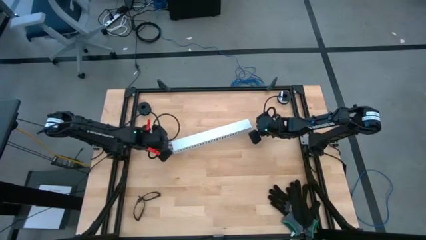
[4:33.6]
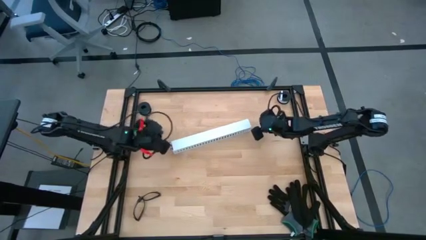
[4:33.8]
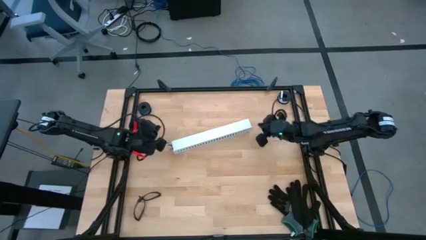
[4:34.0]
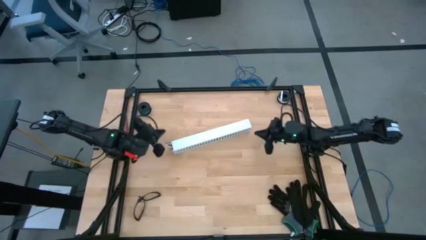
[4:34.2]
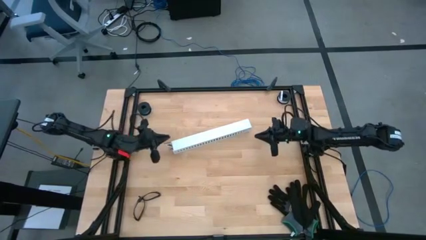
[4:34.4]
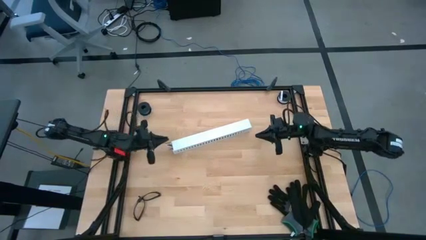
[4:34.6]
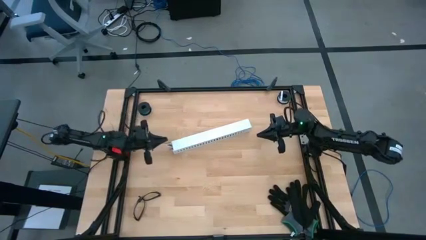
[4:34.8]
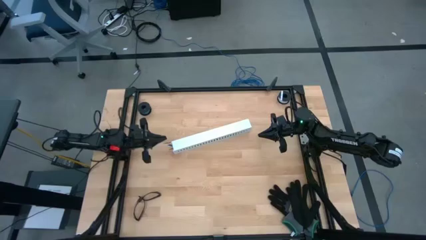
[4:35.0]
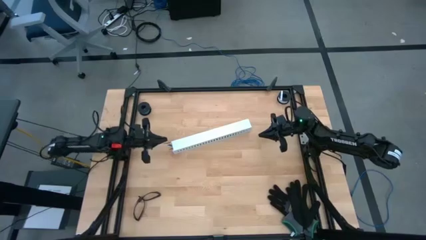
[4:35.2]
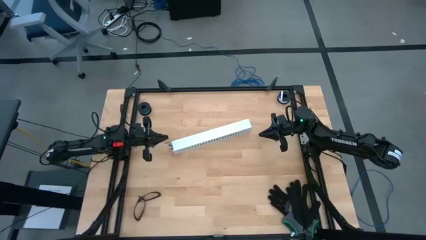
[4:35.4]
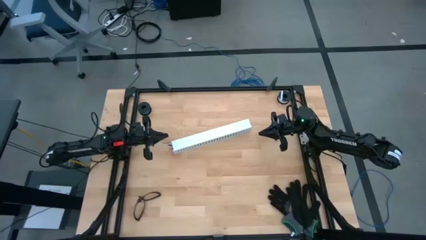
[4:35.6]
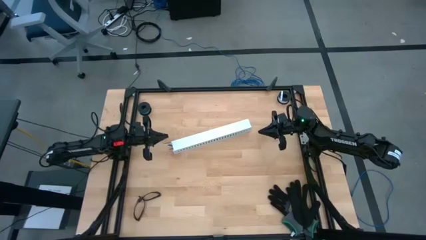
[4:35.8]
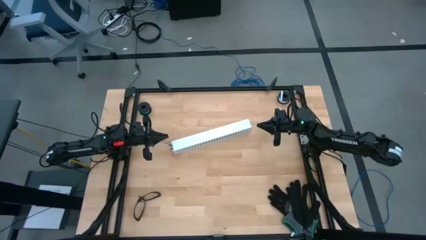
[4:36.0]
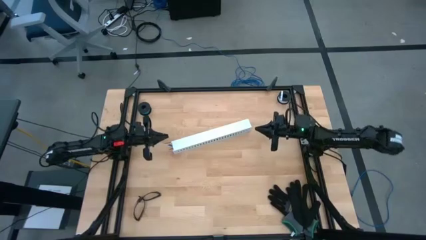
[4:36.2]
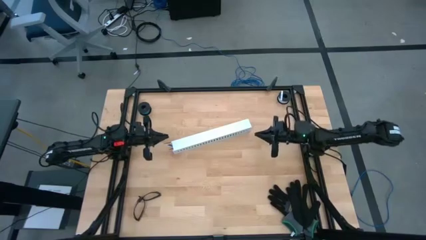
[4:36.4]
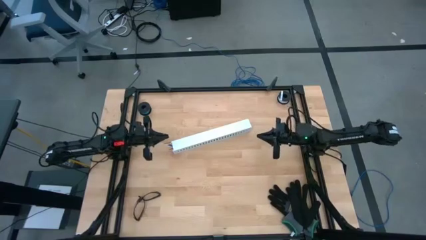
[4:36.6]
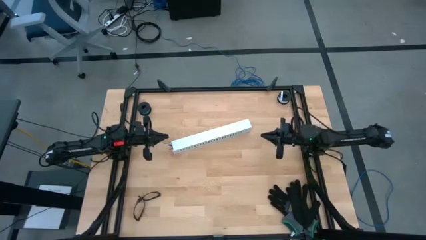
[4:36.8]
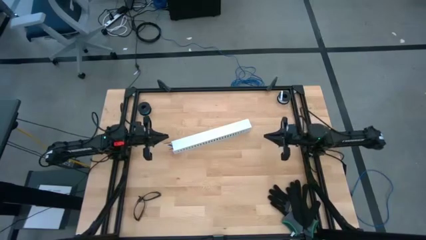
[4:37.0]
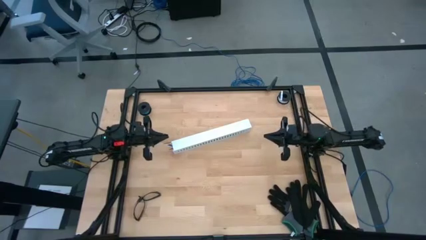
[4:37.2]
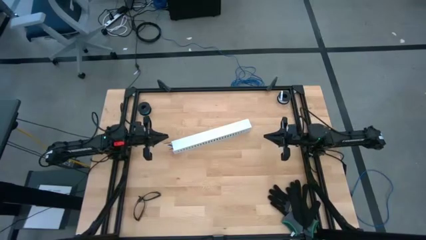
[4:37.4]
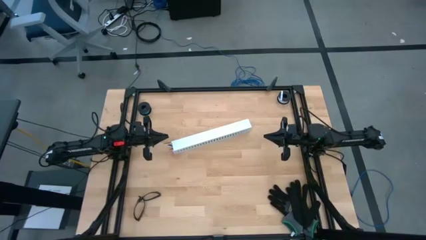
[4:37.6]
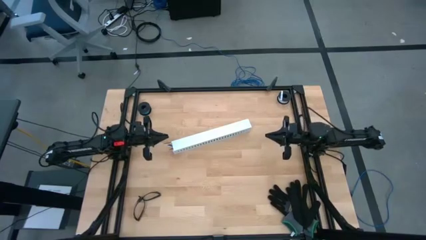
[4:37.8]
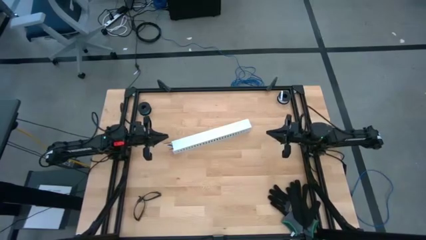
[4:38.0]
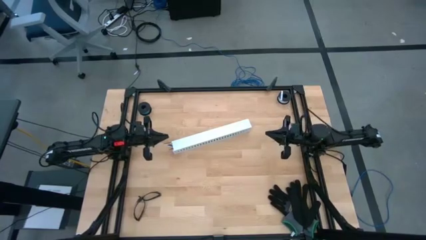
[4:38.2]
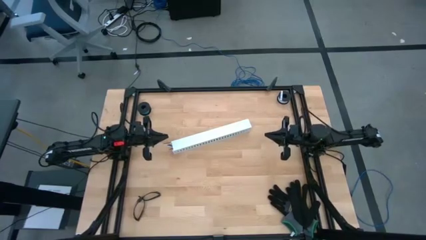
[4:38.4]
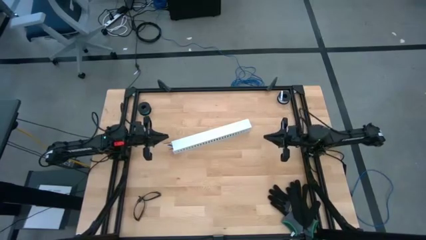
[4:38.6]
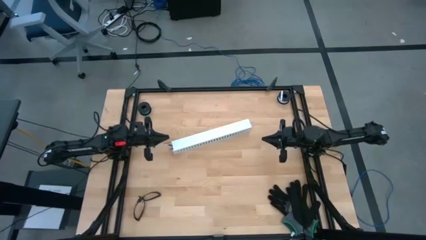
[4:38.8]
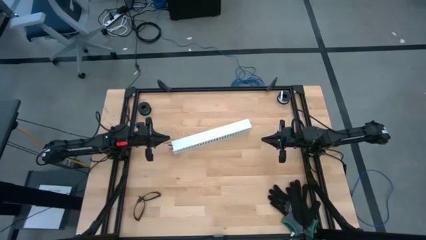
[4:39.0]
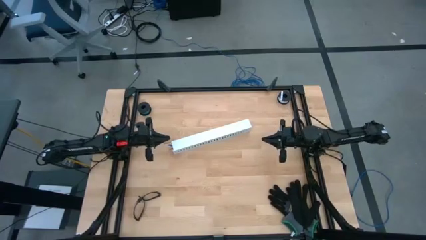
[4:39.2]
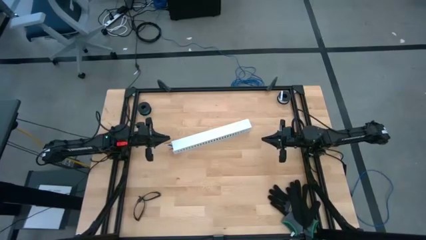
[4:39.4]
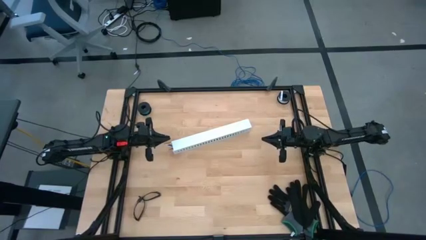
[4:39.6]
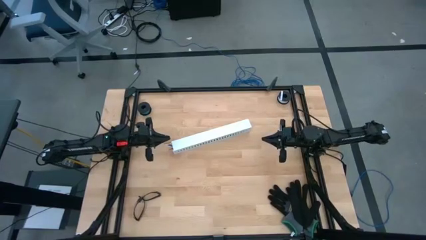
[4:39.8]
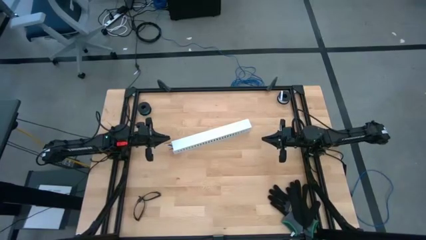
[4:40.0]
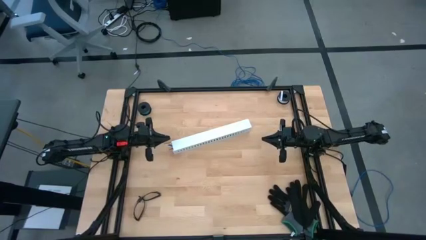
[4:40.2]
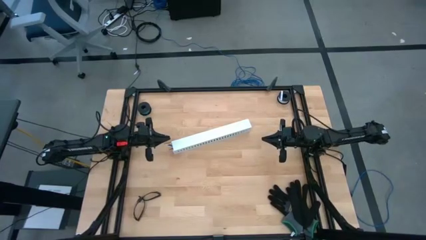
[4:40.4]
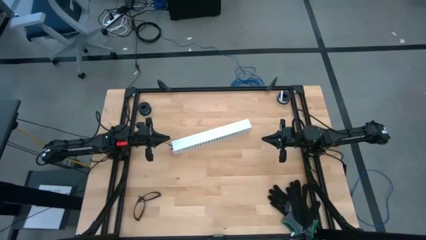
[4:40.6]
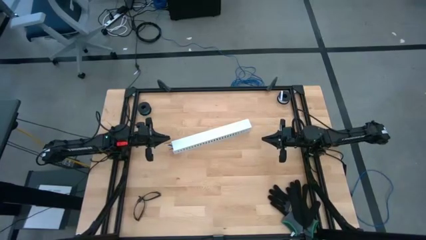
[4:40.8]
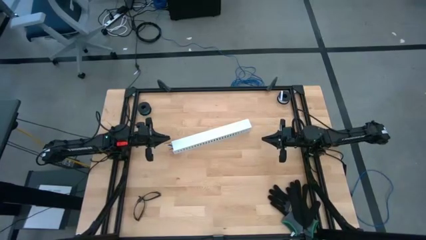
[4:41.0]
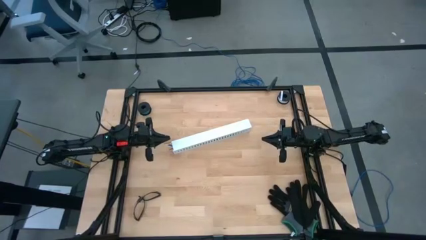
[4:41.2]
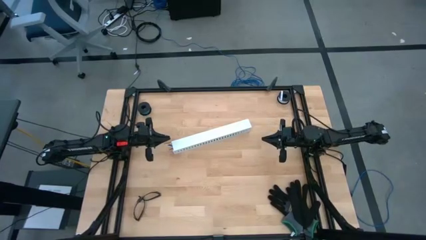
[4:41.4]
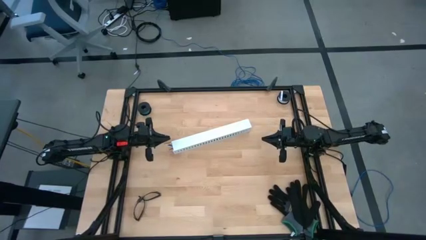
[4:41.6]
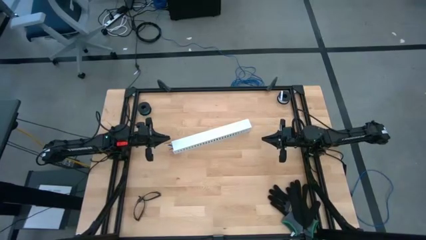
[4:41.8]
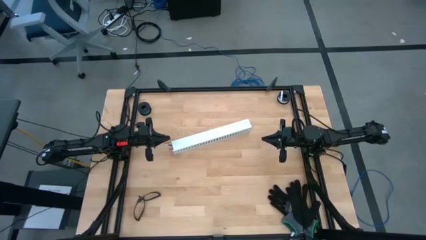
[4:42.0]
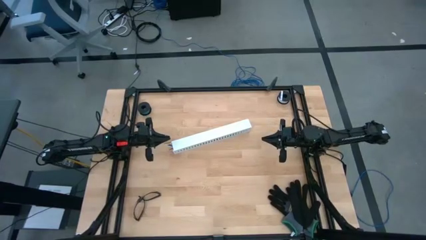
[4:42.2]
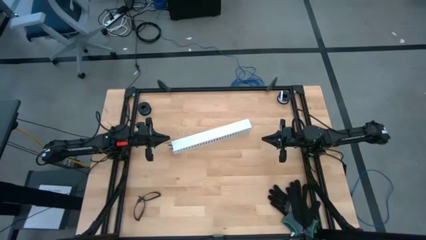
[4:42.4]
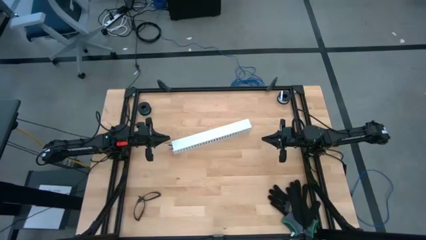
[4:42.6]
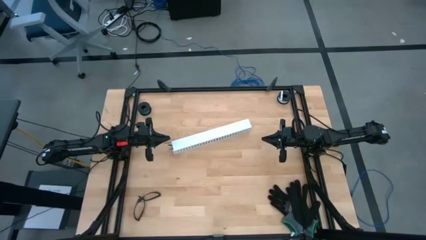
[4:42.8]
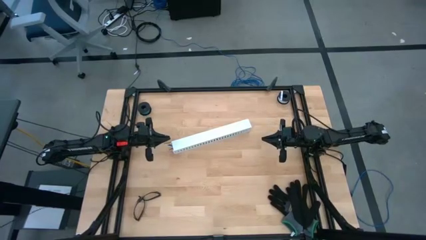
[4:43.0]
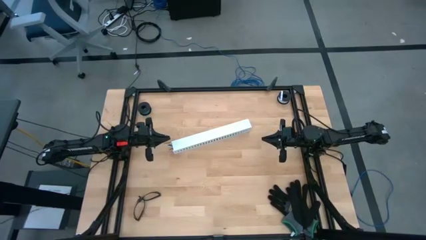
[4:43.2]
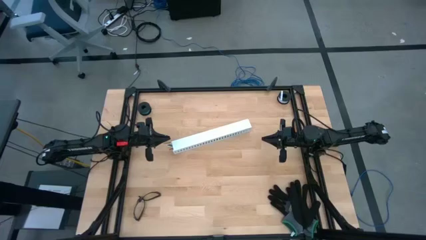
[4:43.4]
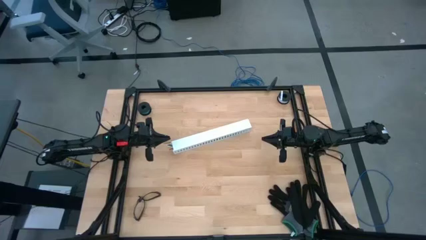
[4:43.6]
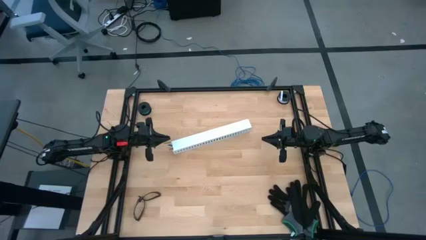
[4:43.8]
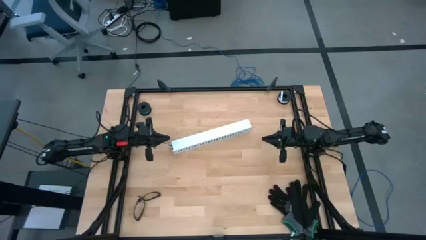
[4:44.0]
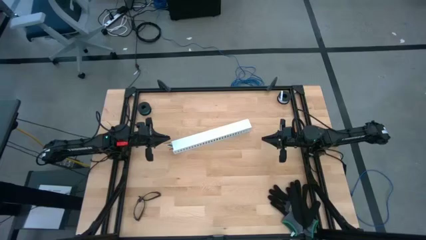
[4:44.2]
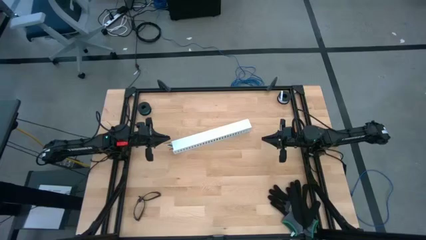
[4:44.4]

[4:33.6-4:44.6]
Task: Ziptie cables
Return to Home Position

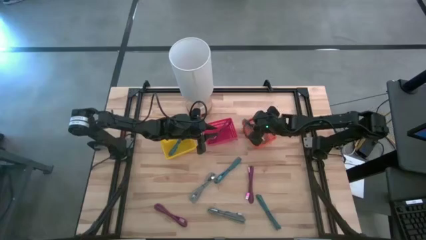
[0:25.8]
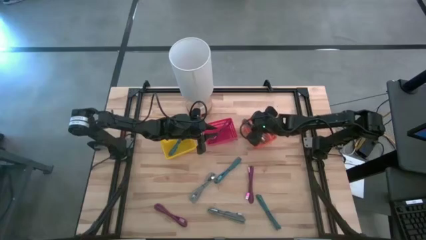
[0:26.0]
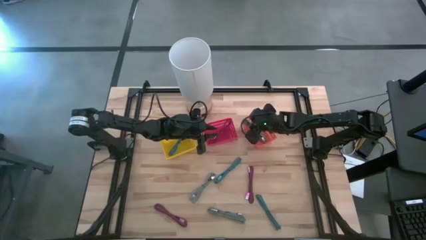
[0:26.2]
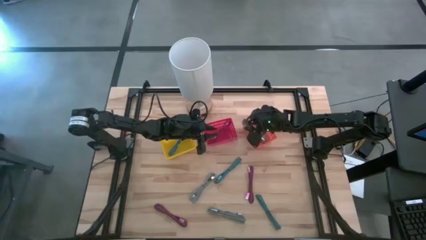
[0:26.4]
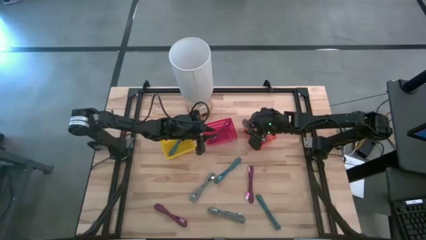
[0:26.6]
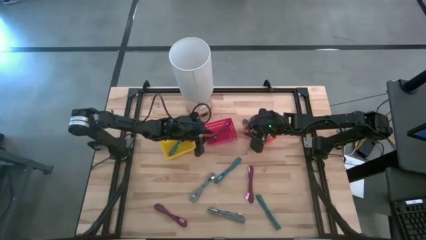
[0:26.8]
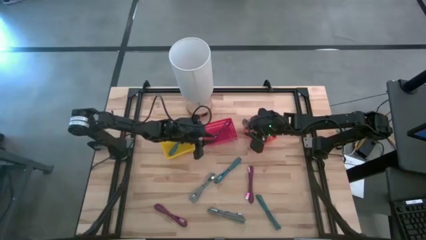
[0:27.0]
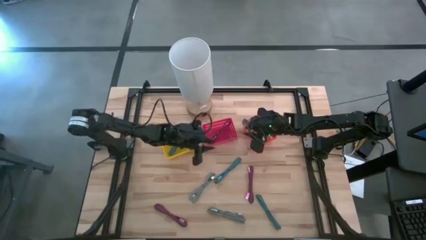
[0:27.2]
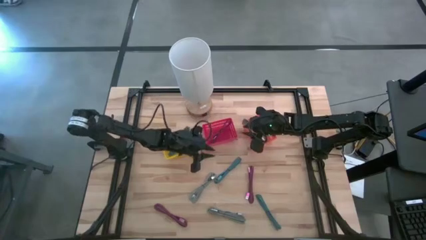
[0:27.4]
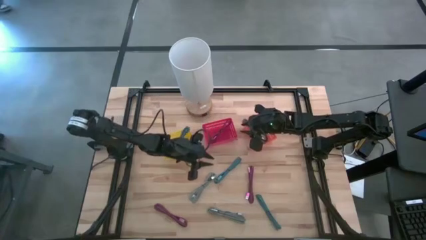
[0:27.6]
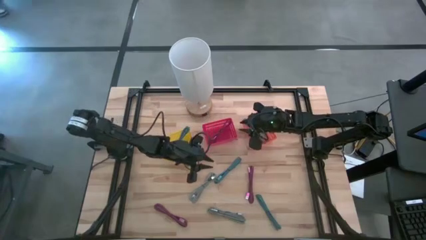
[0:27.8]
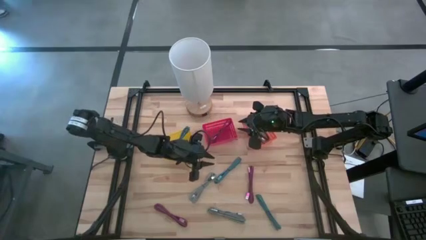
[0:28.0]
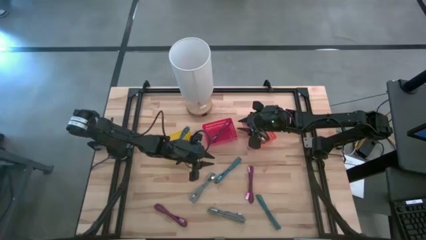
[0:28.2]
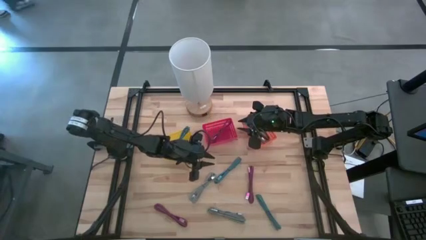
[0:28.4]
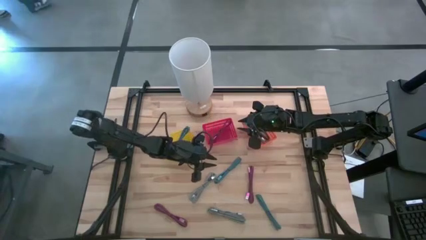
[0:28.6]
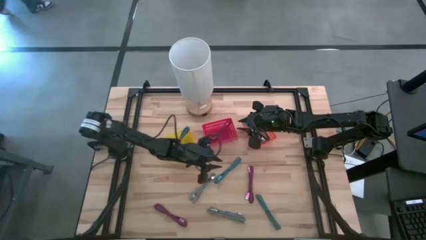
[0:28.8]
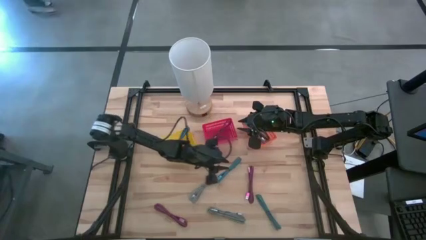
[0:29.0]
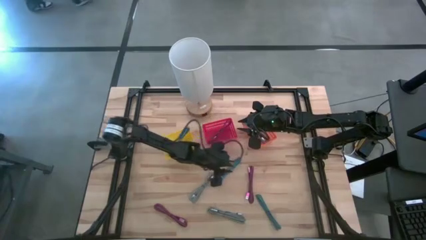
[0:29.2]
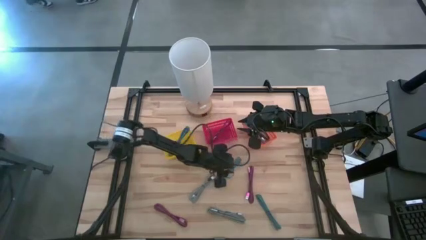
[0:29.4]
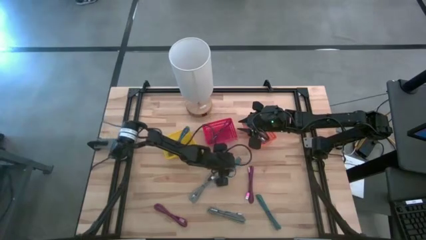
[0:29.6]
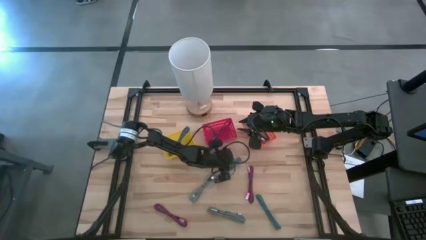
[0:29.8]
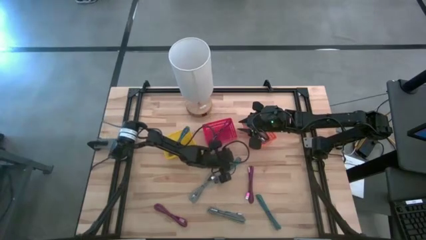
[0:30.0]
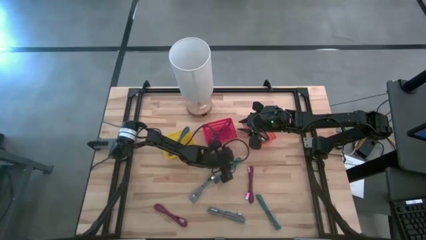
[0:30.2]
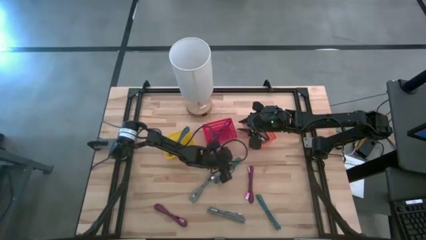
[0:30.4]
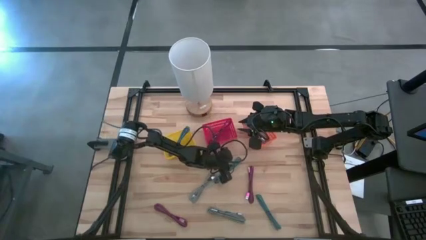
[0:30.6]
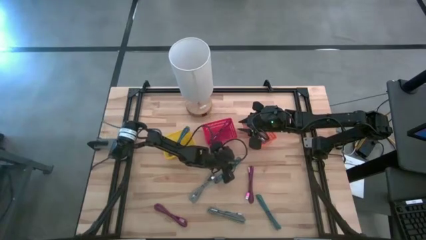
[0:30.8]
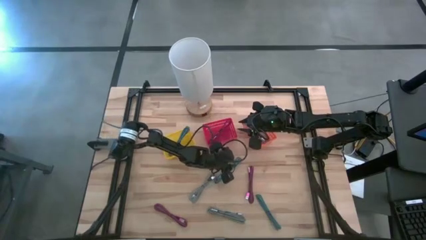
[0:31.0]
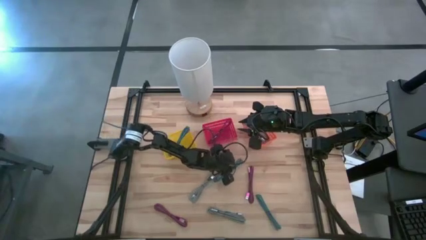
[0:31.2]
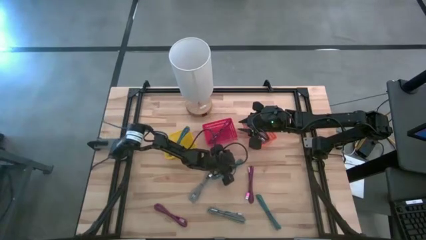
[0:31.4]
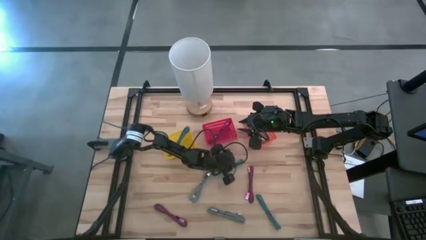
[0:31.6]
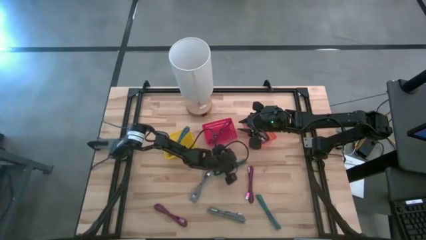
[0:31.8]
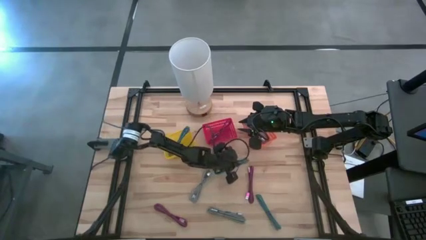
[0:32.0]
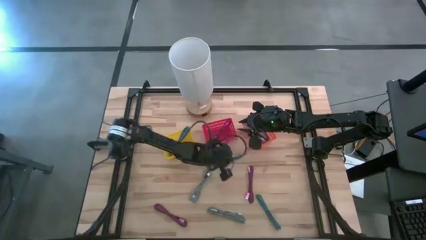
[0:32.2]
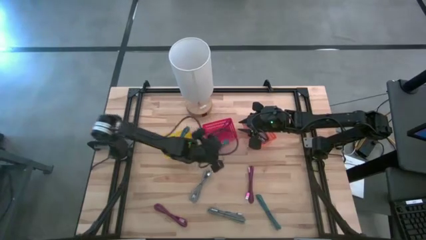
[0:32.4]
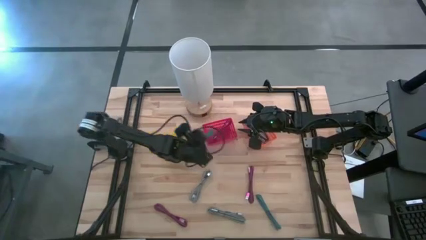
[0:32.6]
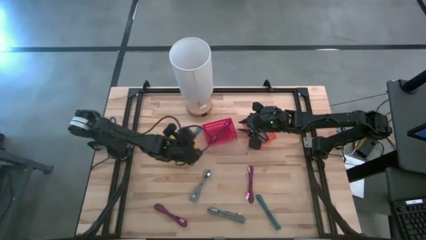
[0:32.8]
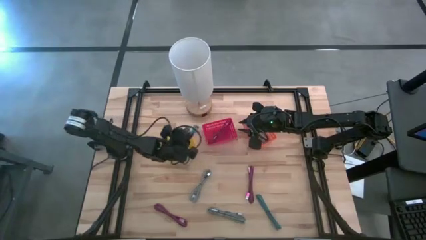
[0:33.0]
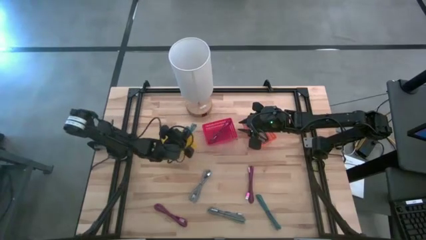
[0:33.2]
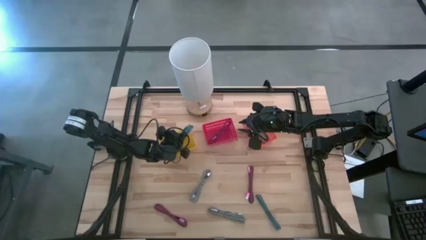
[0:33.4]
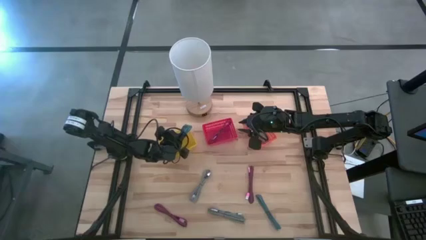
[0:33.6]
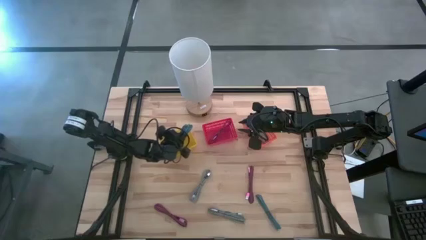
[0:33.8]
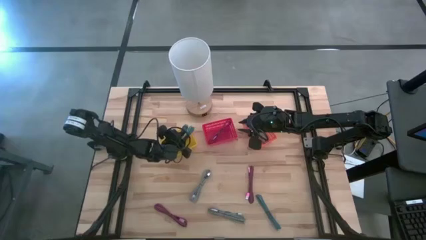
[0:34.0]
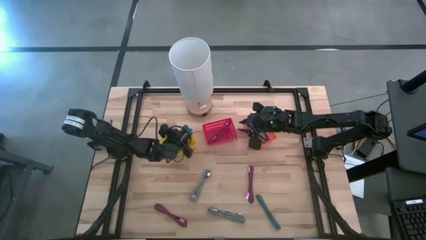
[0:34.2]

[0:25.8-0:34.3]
Task: Pick & Place USB Port
Put the top blue charger cable into the yellow bin
